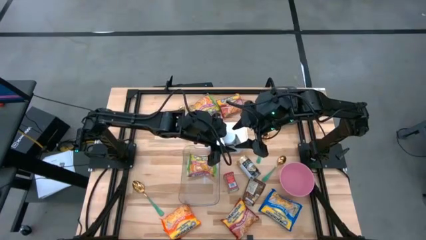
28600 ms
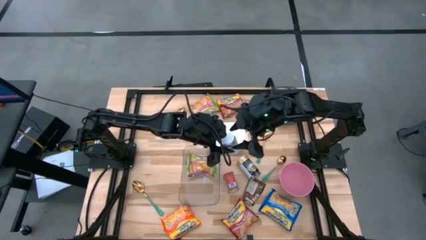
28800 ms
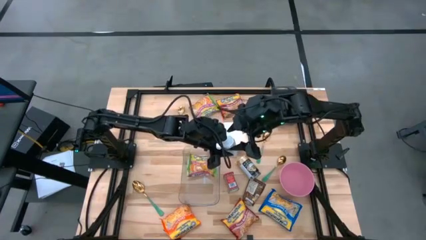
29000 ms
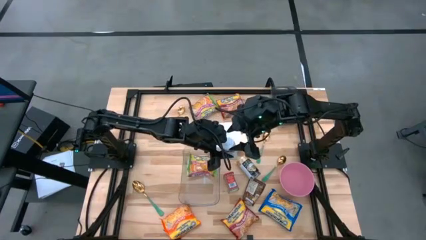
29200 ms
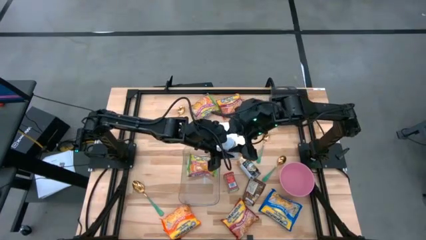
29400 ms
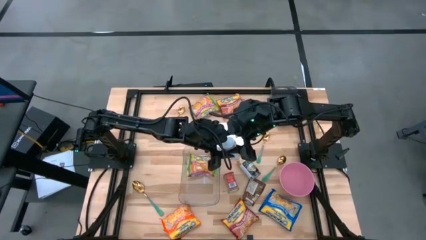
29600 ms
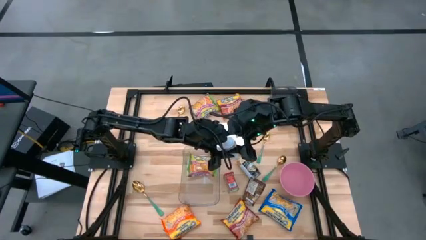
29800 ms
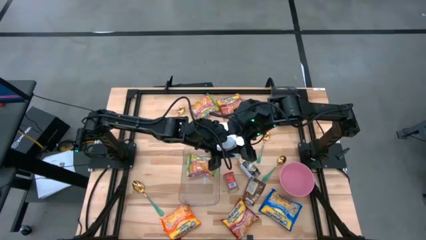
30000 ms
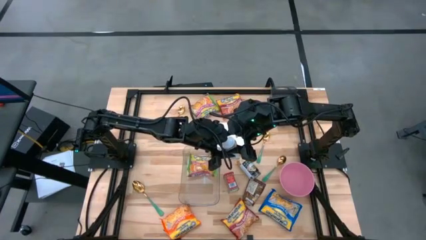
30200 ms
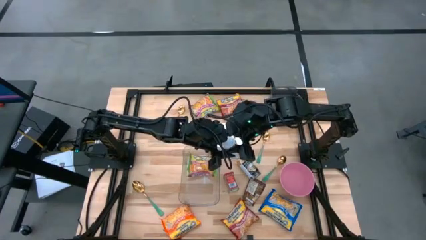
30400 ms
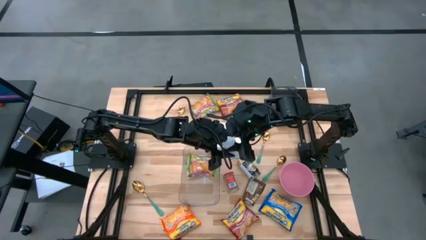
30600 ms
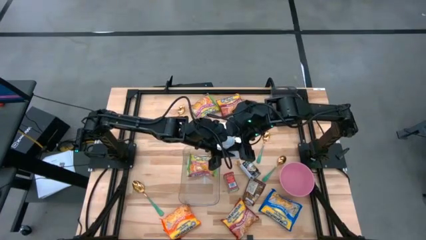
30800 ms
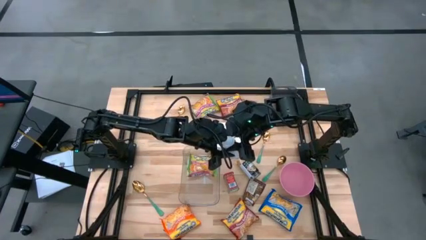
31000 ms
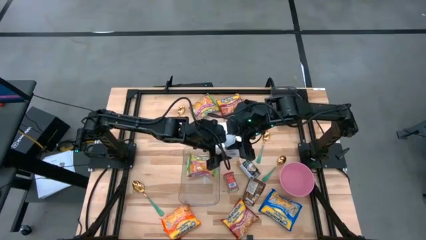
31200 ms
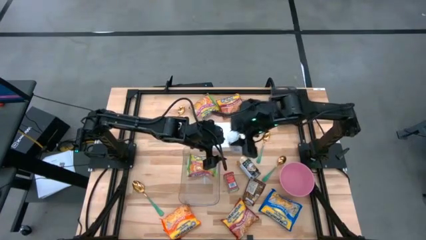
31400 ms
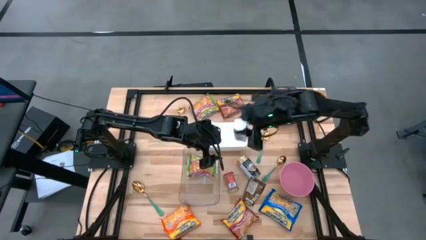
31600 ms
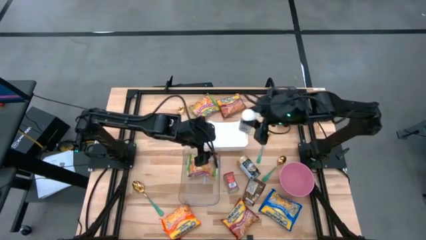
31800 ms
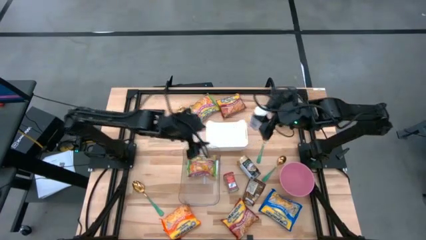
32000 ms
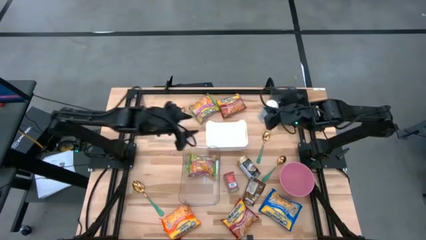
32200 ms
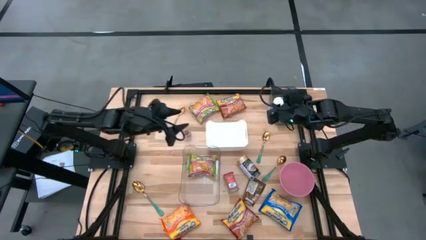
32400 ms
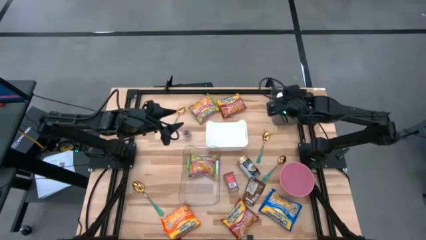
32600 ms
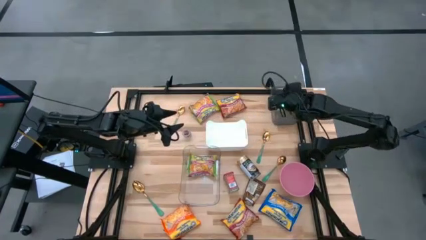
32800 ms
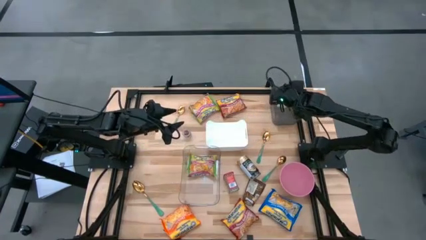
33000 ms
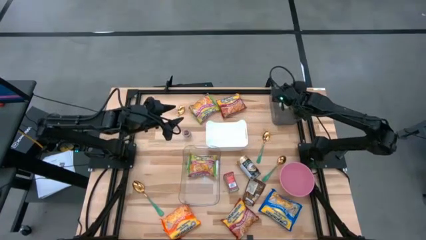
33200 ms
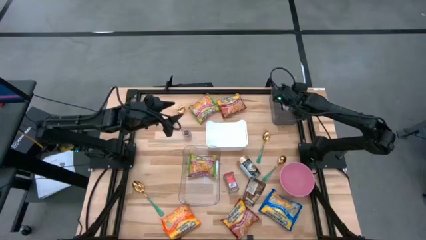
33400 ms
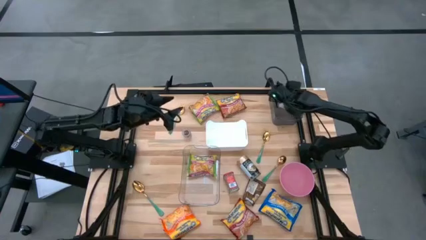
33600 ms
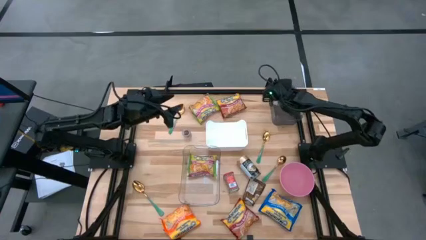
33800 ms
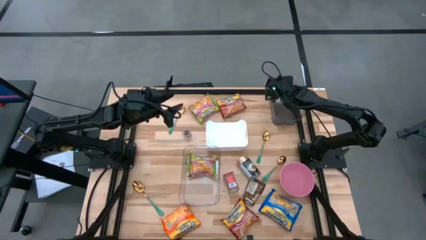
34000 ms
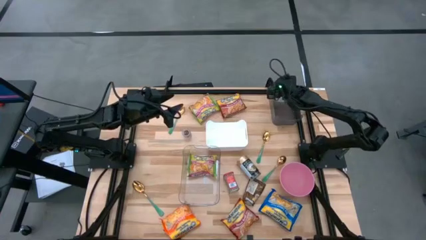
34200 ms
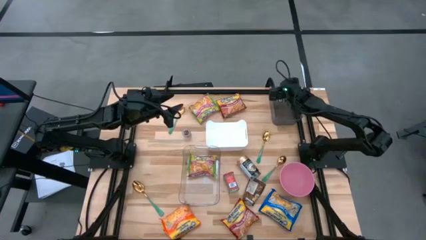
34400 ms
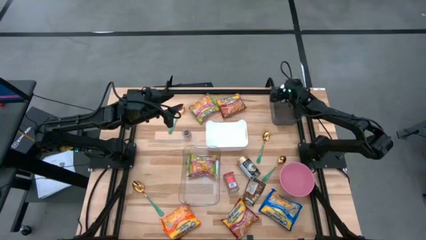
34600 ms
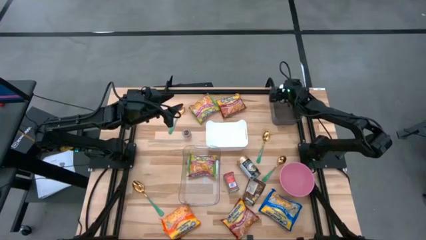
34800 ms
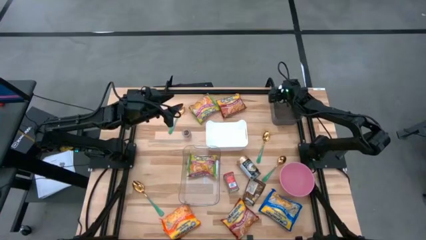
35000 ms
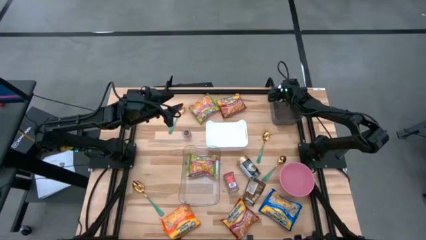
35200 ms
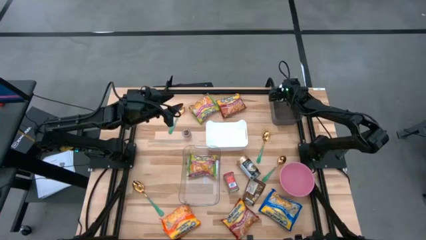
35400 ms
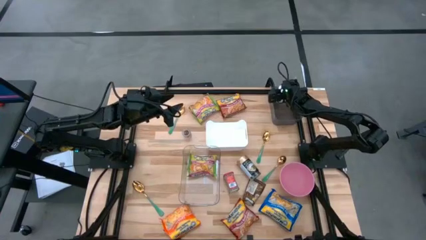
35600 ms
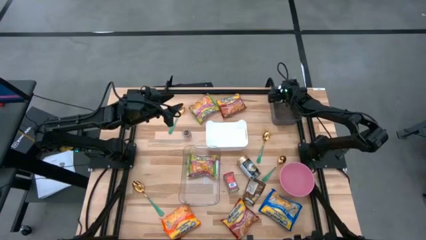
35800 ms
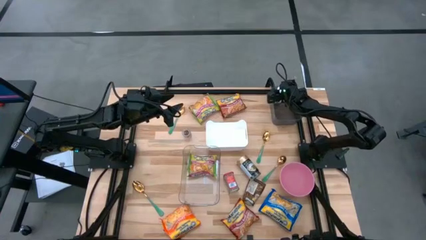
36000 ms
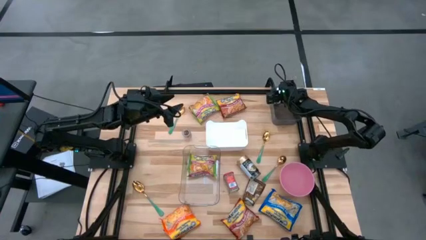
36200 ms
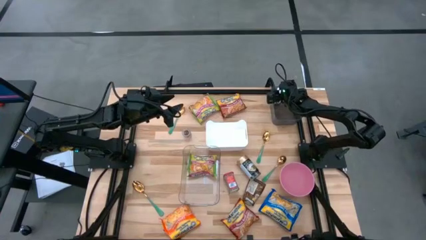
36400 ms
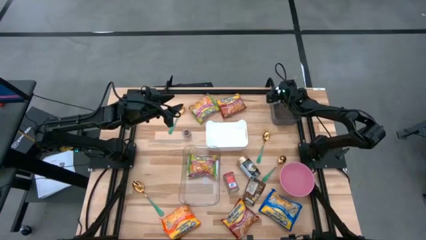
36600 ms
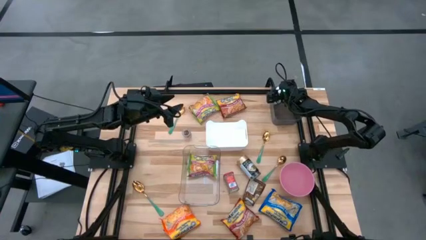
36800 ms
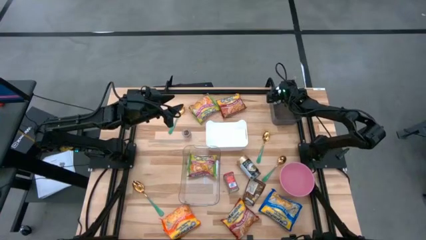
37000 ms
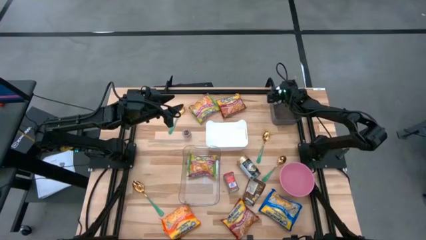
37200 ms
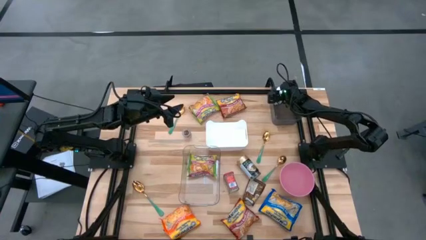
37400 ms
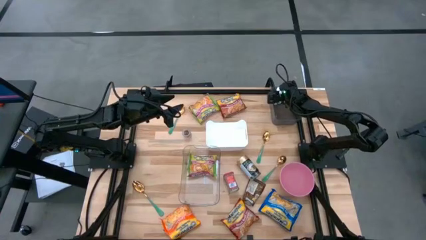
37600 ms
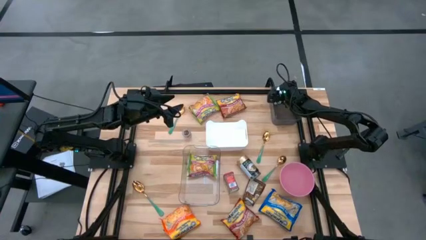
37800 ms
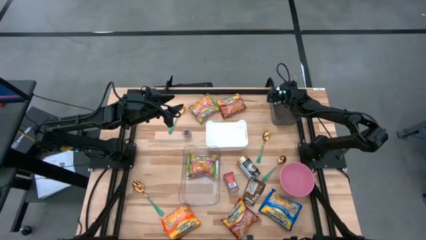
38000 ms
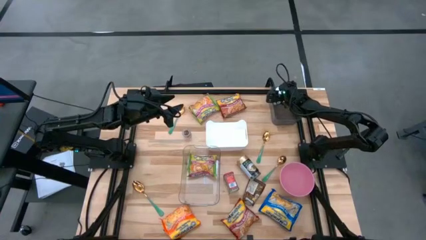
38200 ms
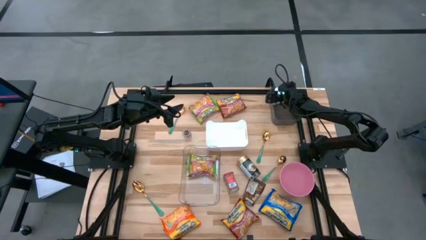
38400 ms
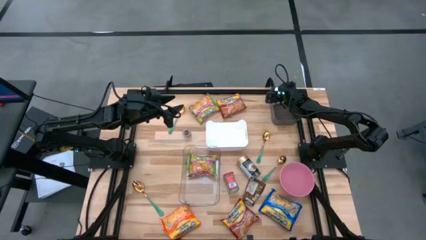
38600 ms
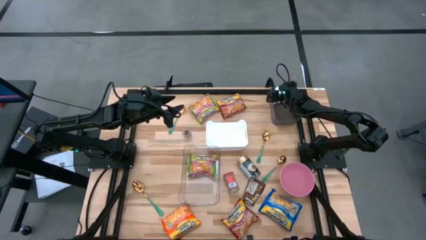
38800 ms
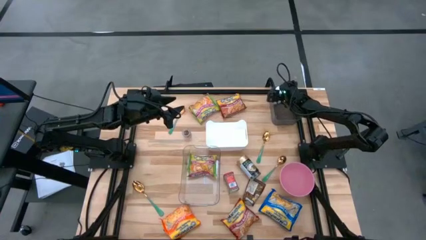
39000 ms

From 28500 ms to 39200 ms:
Task: Pick & Place Food Item
Put the white spice bottle into the black bin
